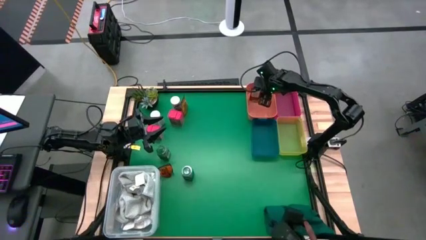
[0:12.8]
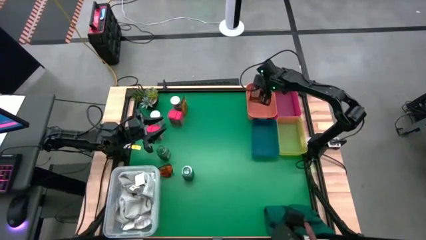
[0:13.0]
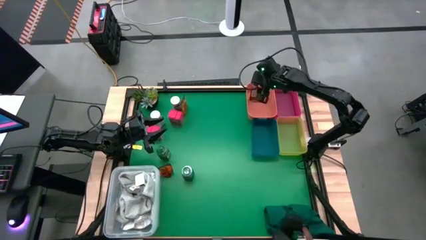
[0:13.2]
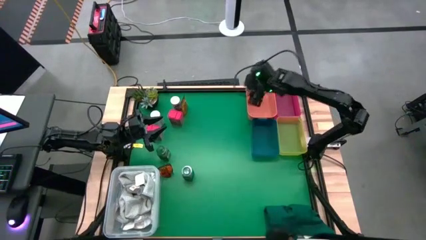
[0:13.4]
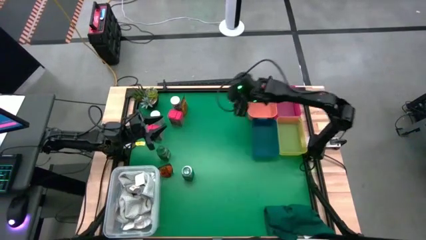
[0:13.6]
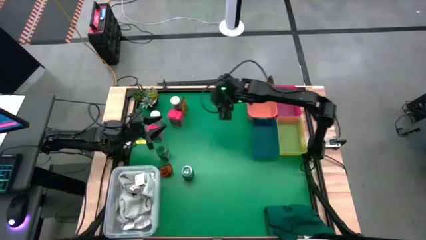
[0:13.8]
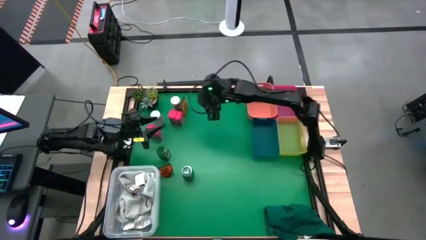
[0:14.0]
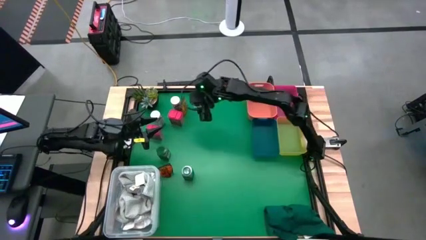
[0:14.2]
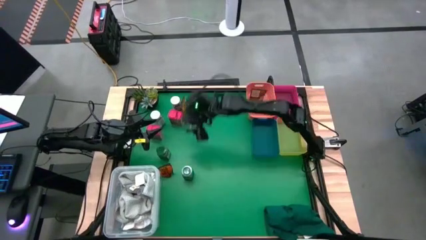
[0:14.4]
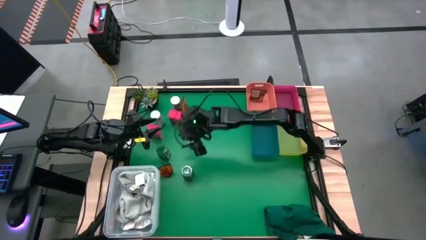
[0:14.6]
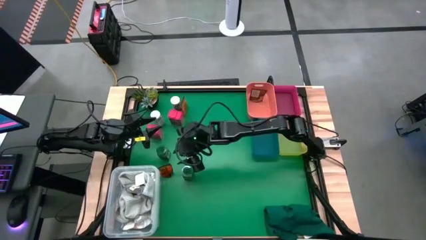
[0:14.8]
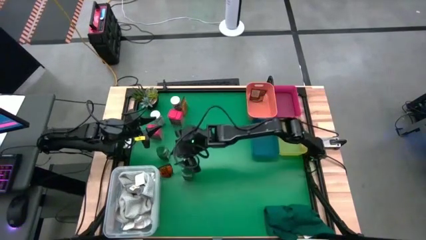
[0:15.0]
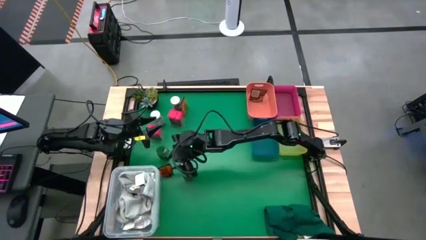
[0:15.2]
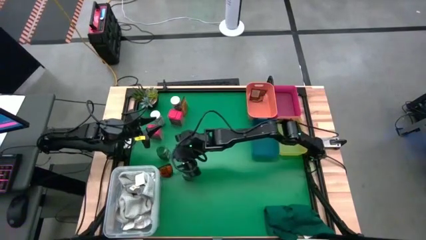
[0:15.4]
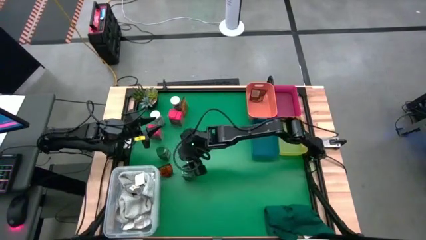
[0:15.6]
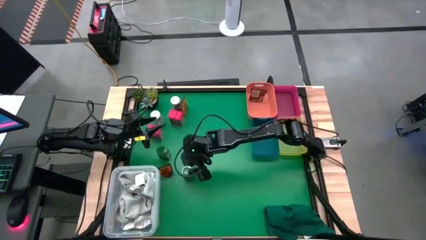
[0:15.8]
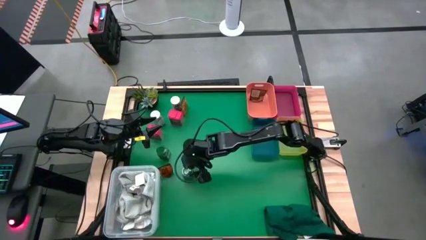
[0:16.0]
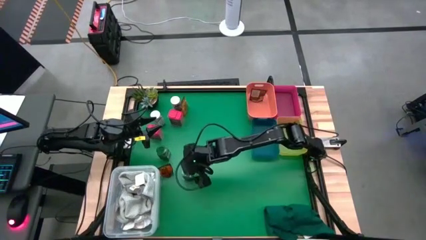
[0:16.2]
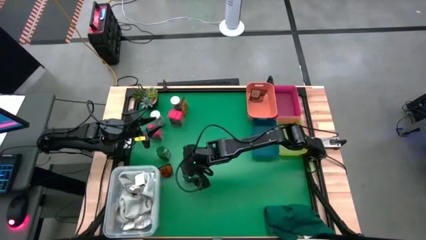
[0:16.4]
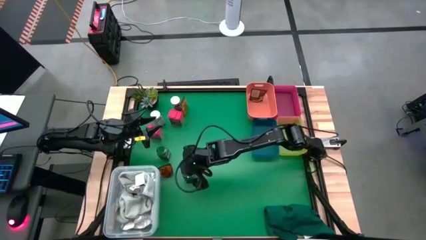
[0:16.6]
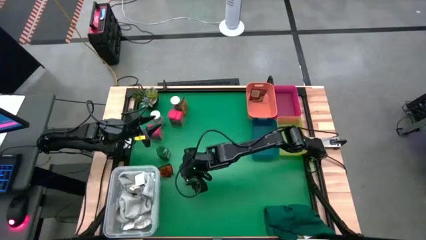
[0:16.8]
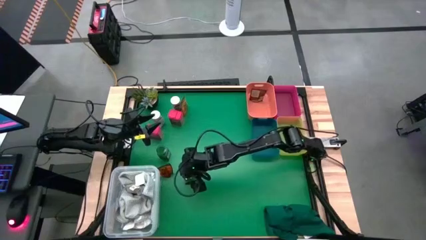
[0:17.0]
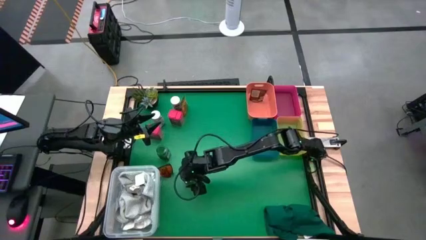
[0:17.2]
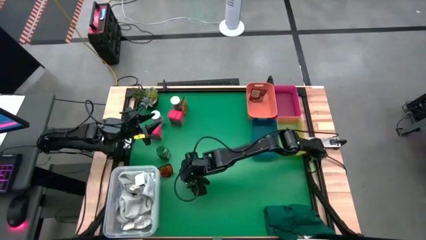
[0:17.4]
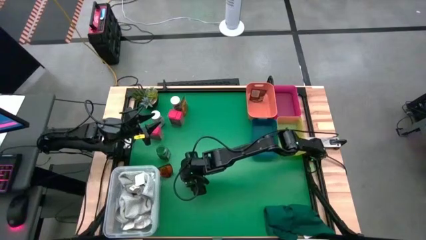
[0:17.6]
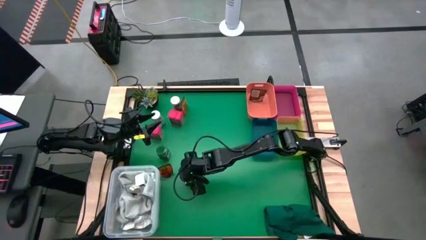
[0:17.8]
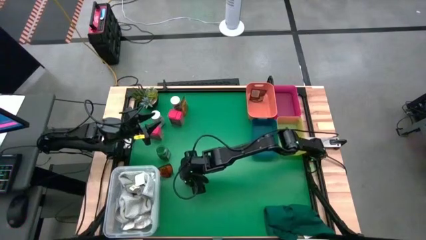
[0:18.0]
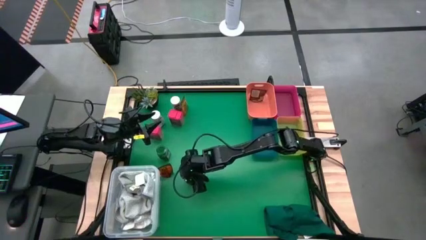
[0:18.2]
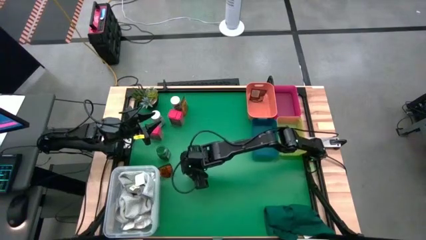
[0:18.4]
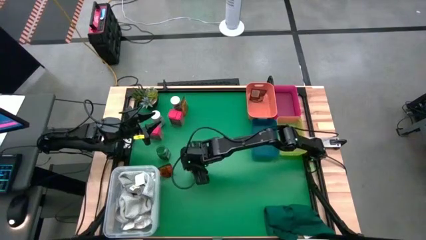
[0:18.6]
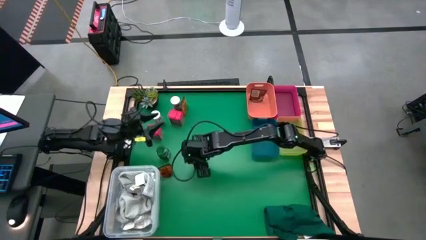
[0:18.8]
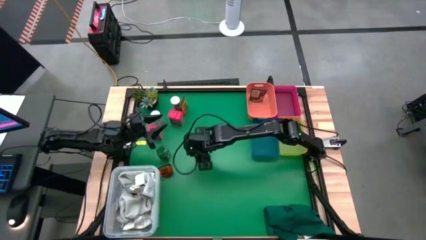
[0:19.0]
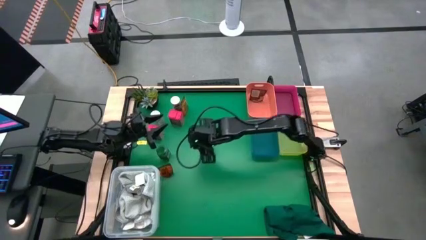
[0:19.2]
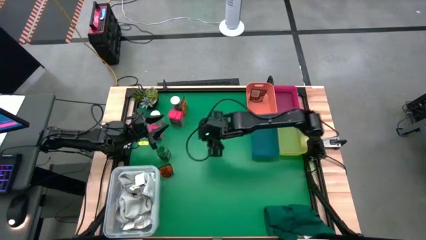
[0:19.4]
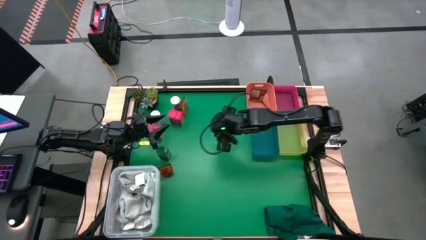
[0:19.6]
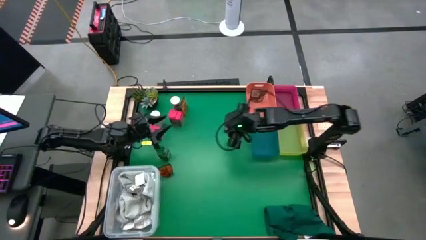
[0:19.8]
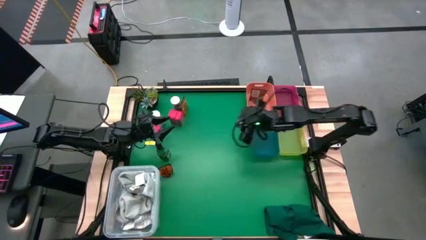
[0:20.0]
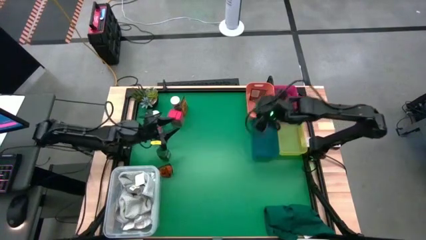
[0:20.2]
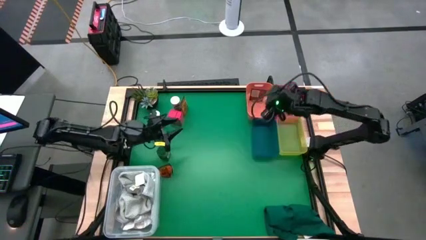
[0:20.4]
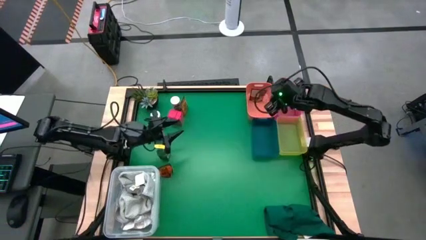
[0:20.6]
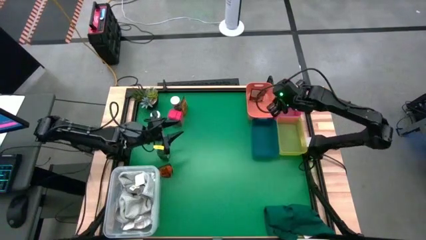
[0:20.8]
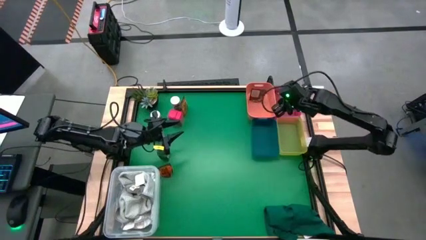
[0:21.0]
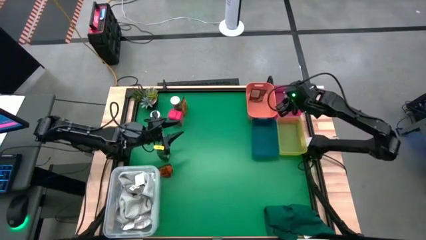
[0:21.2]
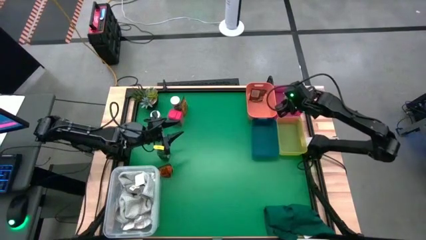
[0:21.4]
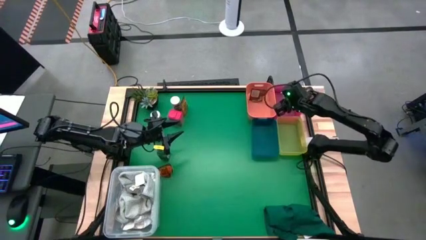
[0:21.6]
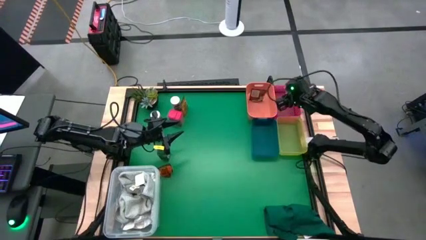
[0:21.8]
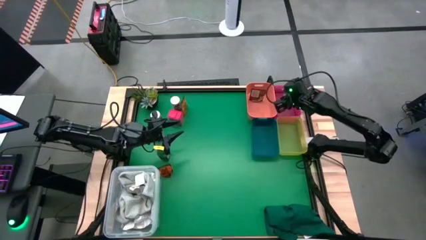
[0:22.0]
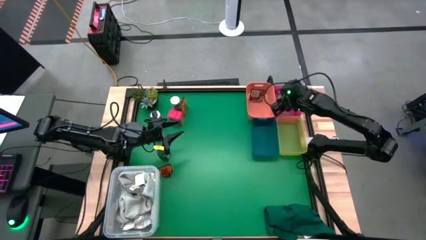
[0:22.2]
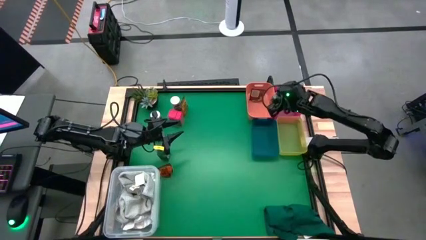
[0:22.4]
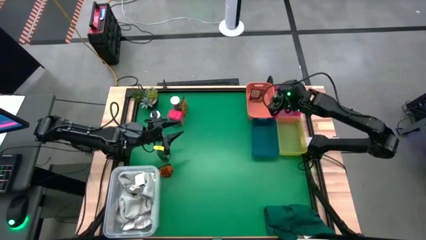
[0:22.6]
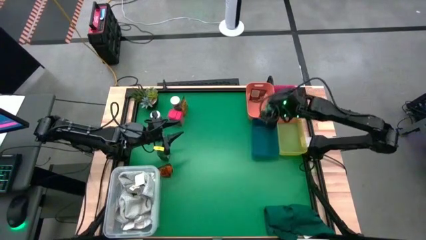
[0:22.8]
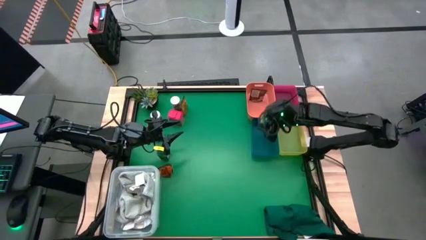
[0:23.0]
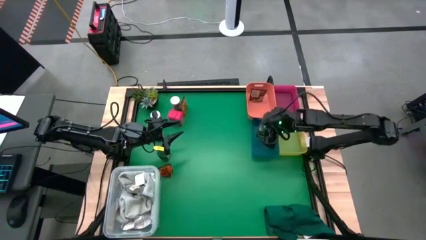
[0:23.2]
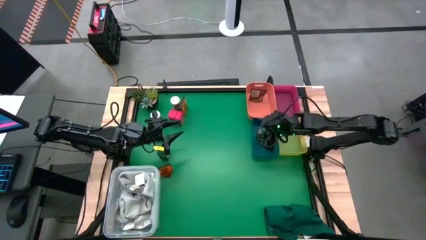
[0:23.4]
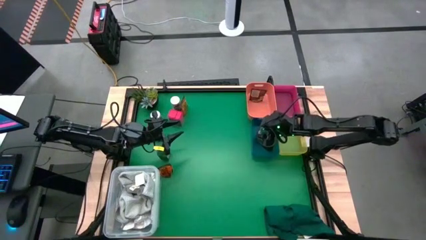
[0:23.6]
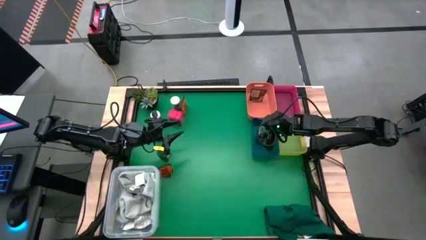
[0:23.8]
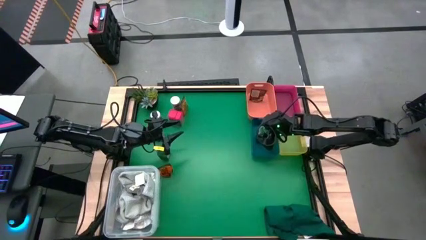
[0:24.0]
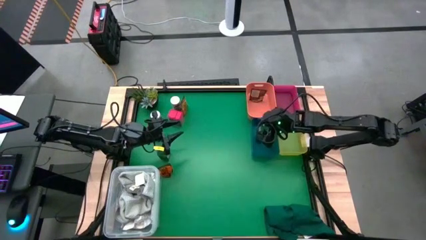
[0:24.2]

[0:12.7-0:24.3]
Task: Sort spices by type
Put the right green seasoning bottle into the blue bin

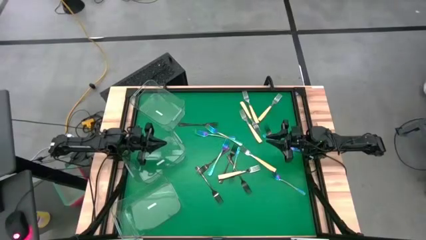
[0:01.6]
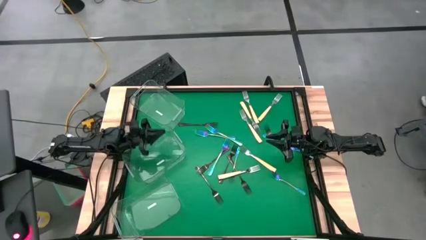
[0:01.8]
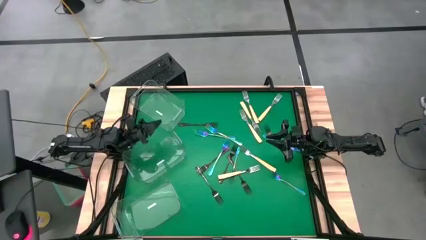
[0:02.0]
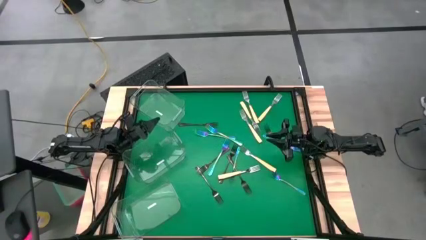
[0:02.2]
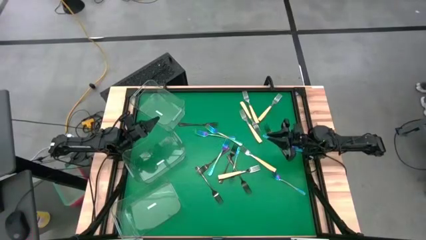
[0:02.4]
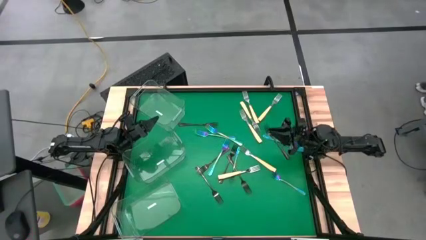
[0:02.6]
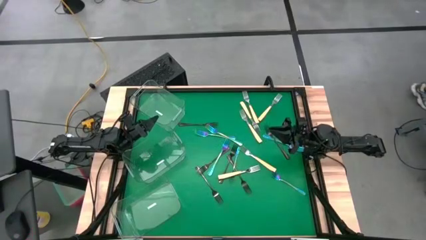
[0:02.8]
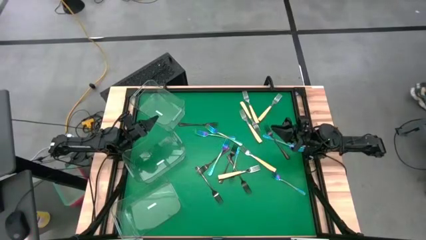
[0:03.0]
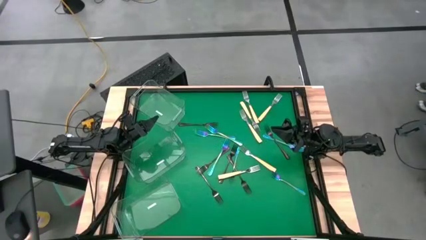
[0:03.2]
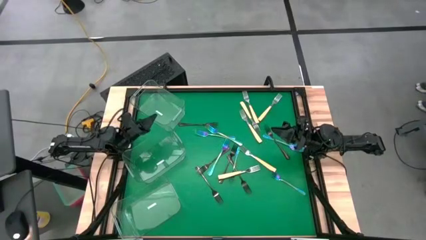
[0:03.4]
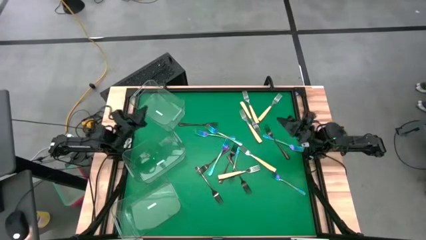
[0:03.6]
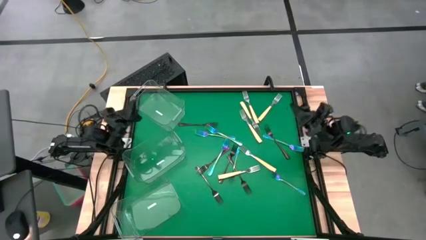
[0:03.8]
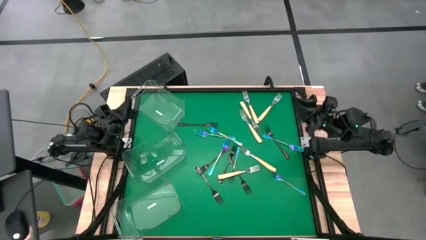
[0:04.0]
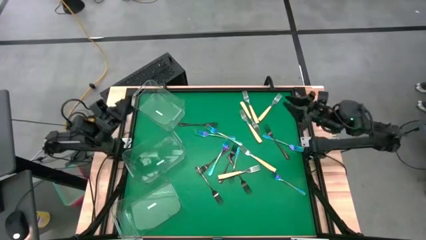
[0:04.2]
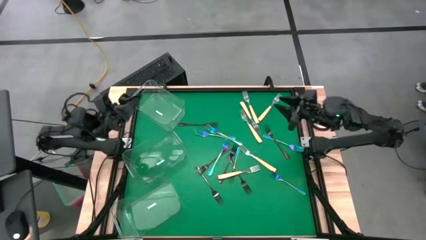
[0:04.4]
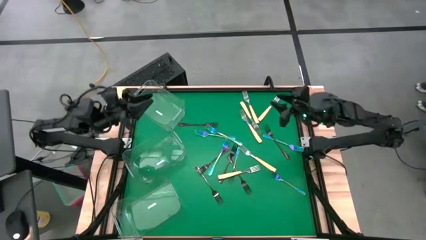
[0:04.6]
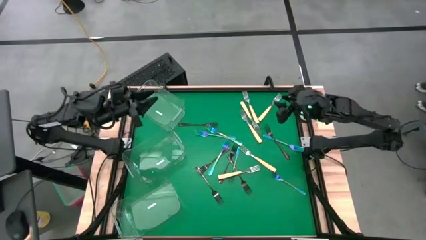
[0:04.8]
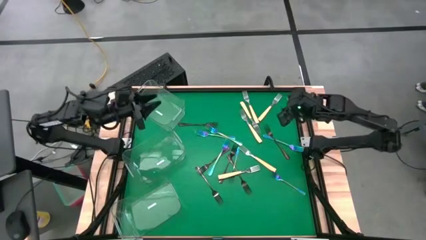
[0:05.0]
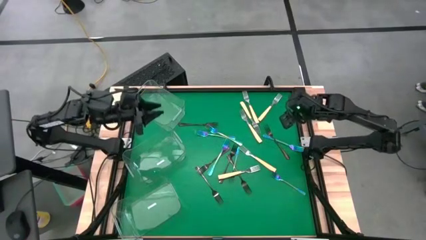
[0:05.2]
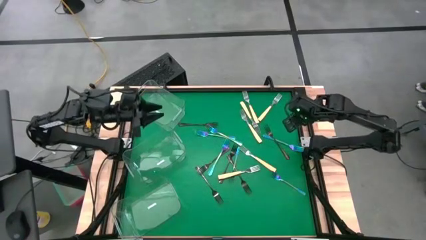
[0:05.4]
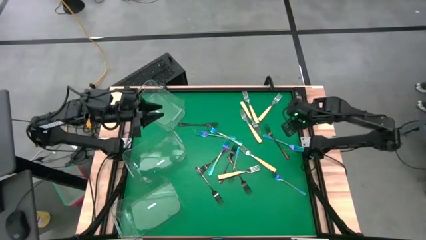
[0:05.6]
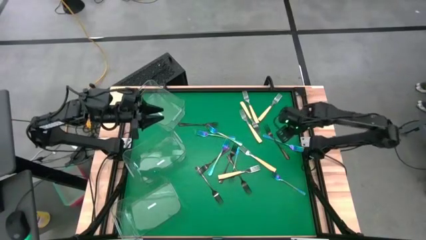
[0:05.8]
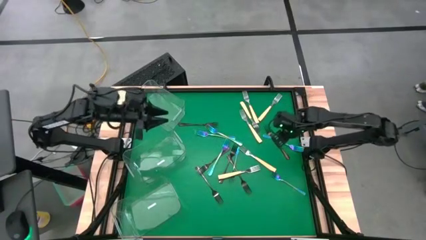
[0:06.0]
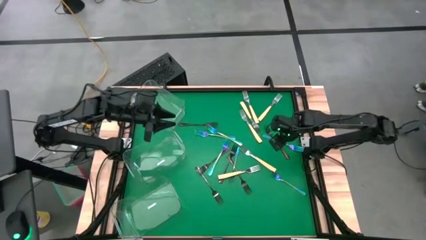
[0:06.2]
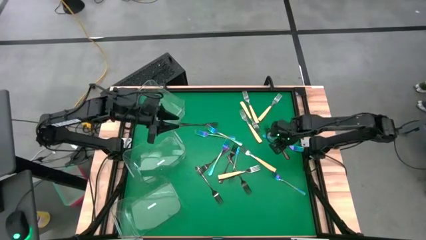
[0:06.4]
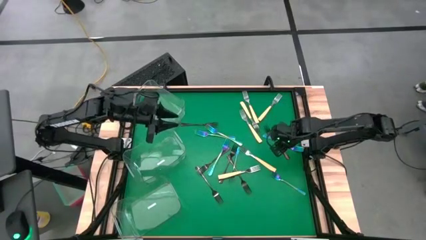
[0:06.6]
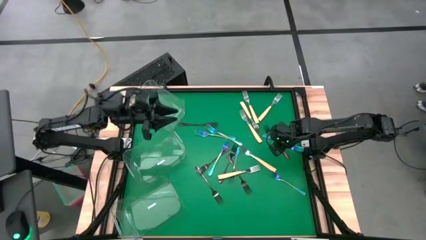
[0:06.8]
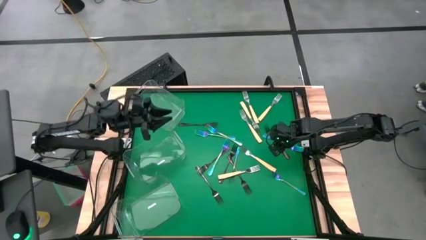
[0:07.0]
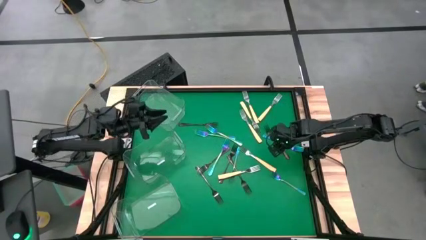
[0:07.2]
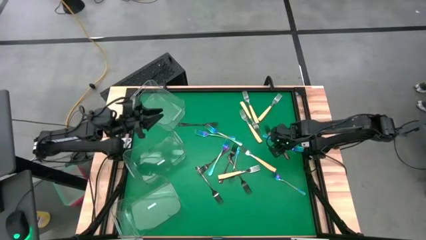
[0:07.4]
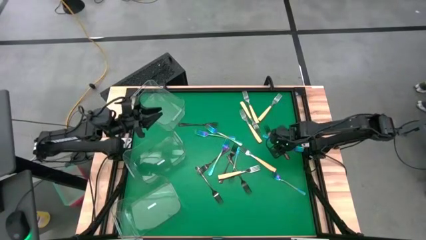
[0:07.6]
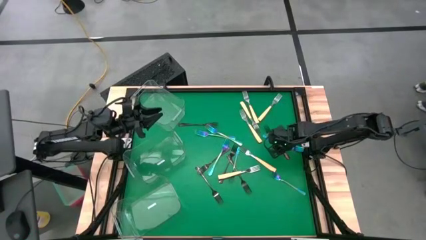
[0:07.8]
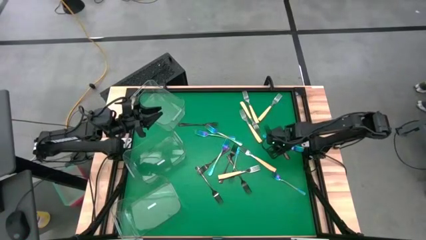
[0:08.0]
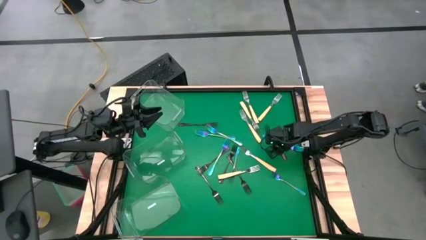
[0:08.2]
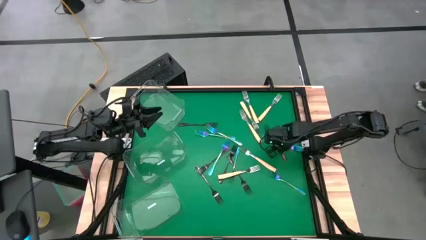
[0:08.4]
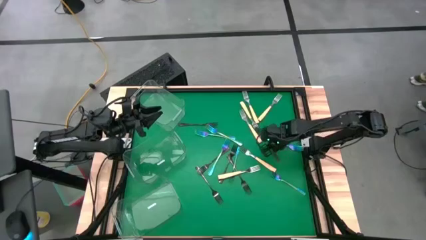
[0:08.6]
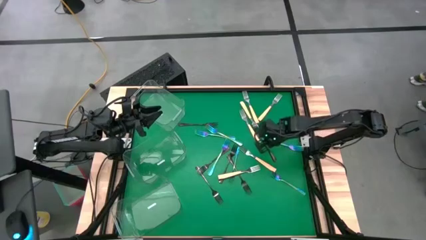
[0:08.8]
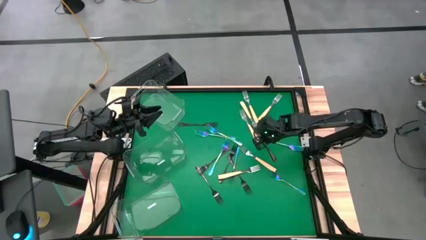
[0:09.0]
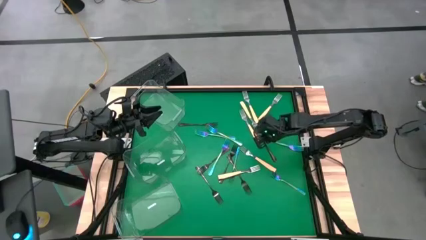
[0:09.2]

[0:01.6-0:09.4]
Task: Sort silverware by color (type)
Put the black fork into the top transparent bin
